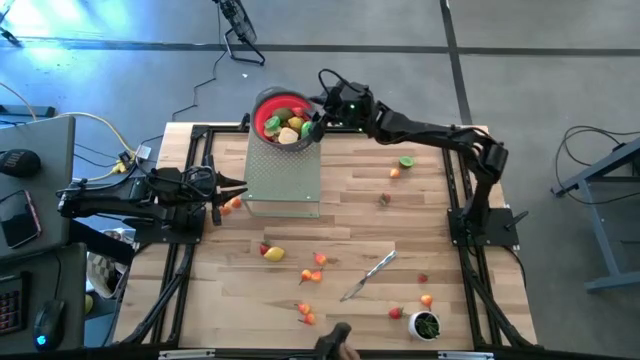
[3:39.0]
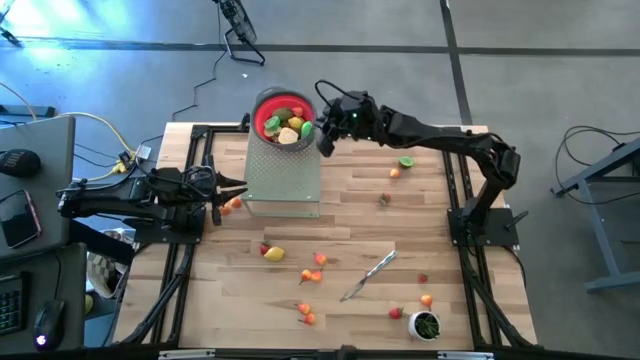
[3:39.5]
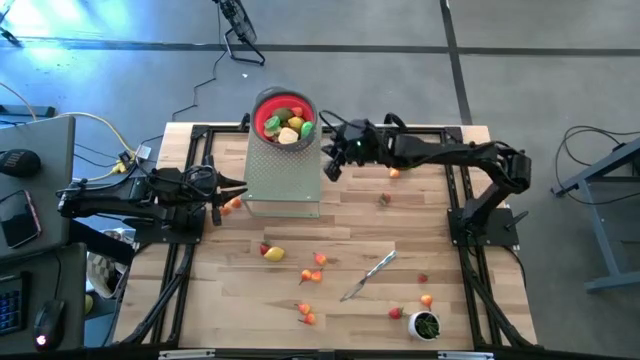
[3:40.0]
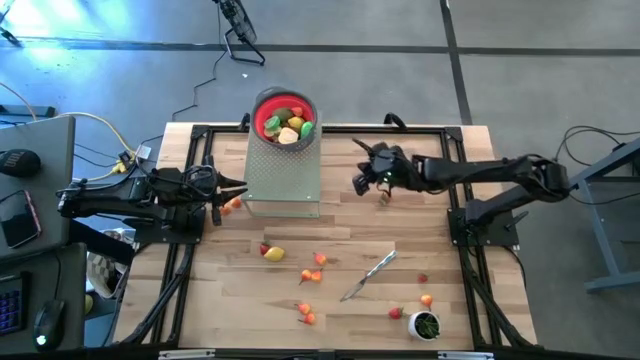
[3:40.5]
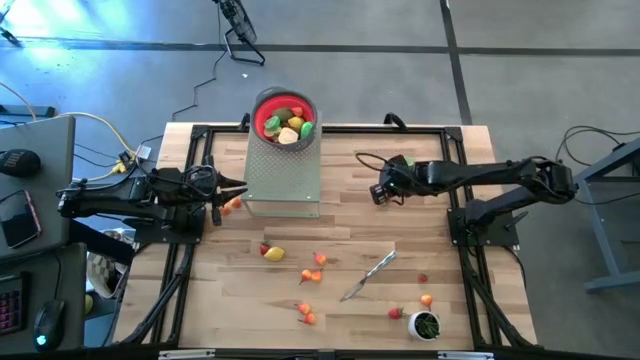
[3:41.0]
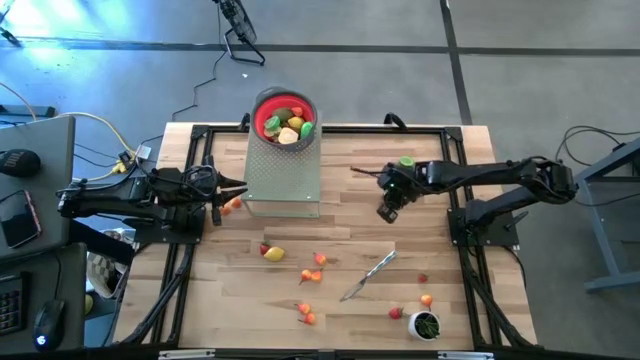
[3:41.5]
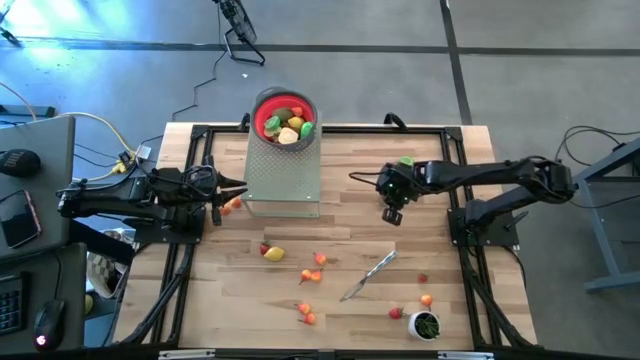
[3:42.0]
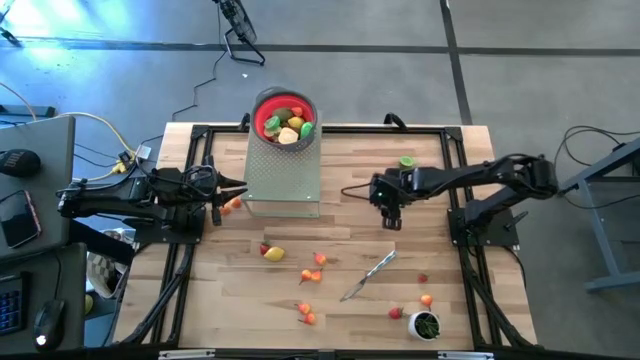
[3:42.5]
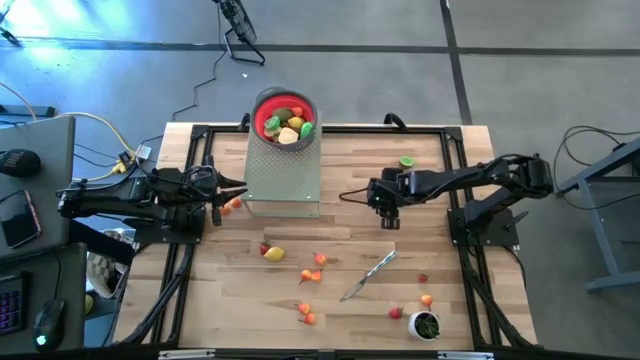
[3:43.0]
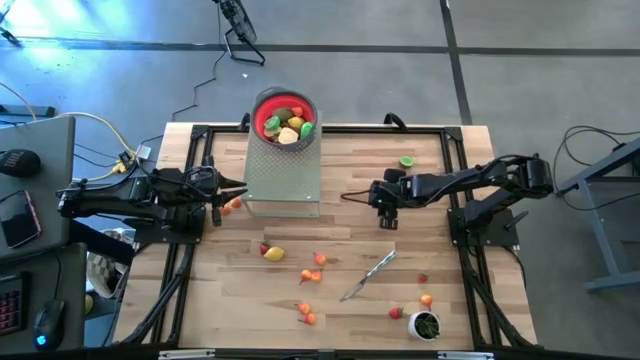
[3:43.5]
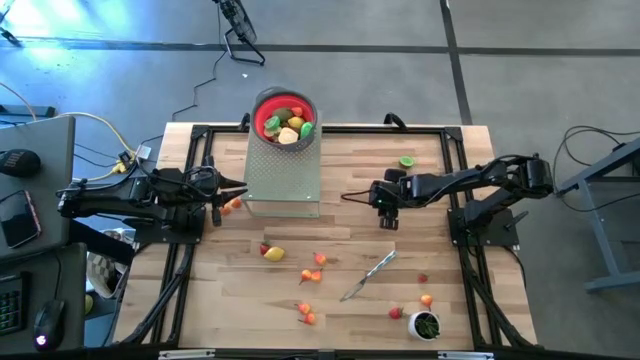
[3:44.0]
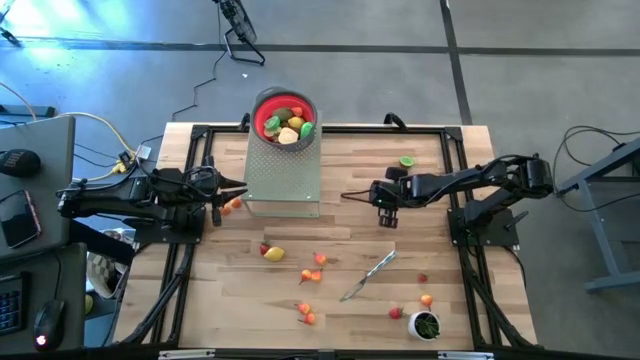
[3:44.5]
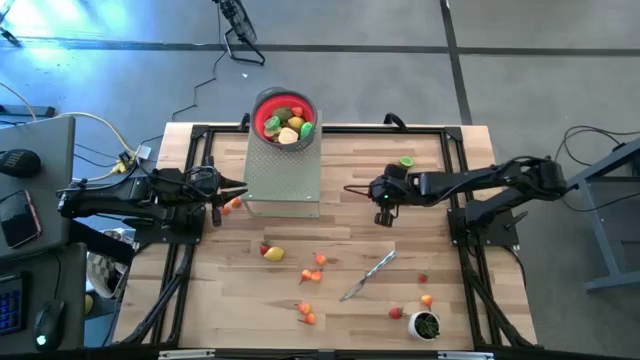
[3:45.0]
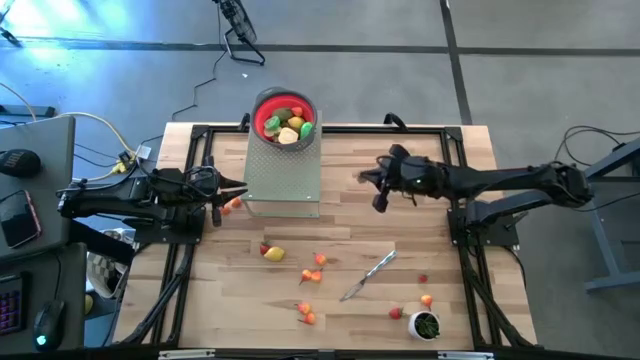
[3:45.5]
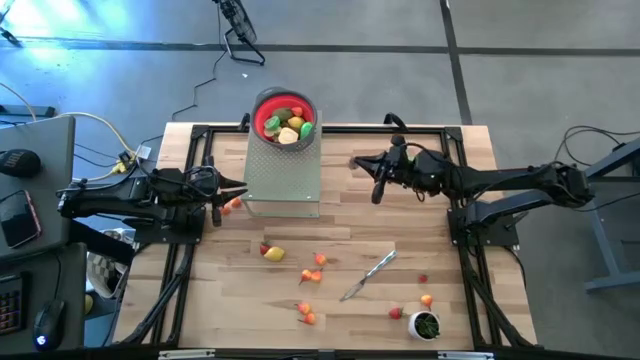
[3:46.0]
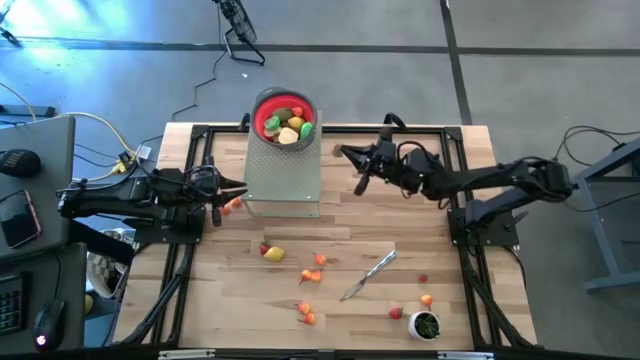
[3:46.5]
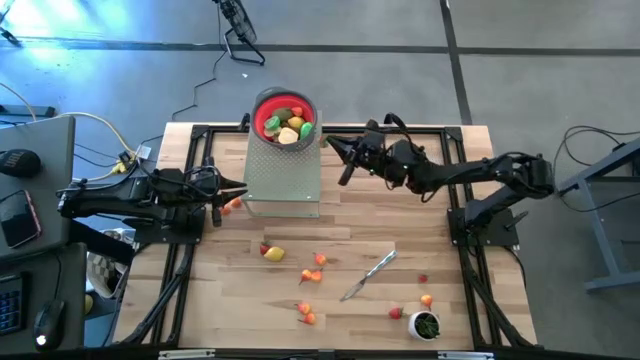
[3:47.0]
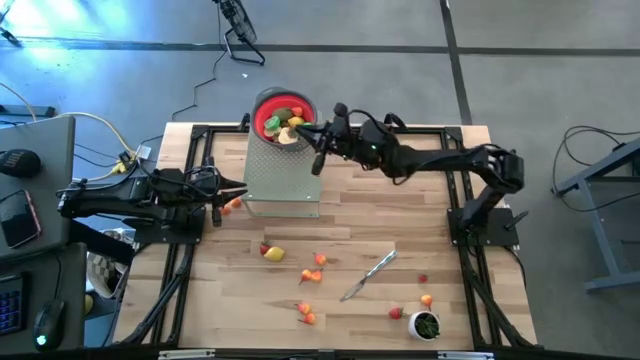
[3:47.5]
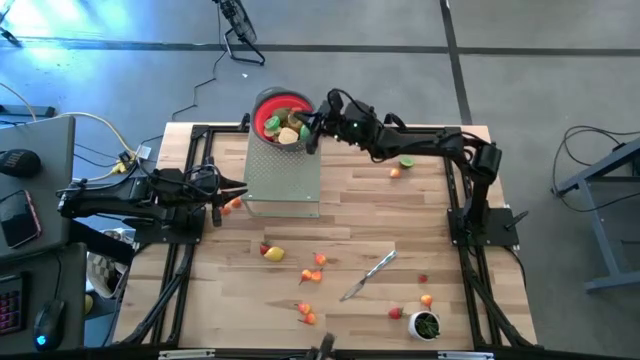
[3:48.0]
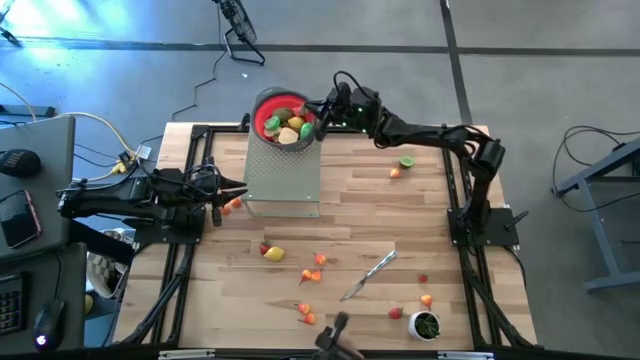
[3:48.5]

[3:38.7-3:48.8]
Task: Pick & Place Fruit
Put the strawberry into the red strainer on the shelf

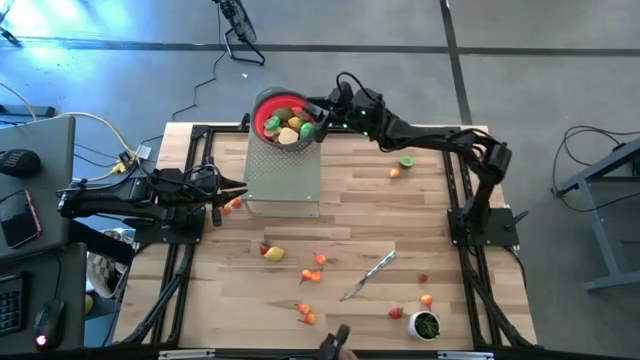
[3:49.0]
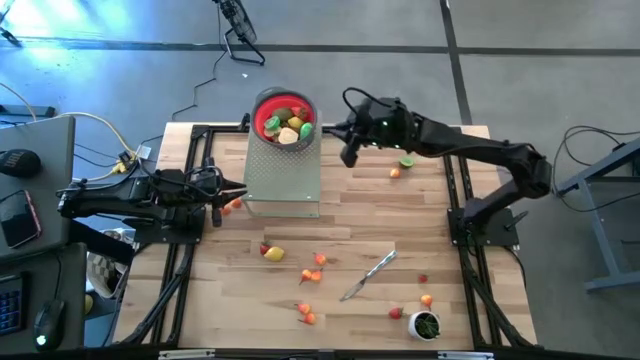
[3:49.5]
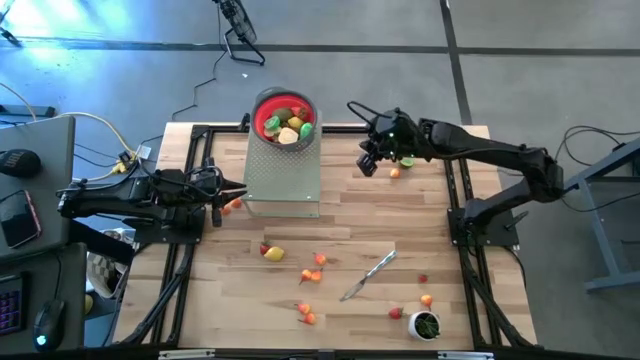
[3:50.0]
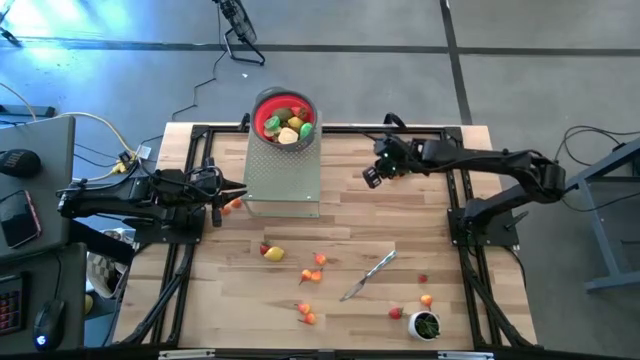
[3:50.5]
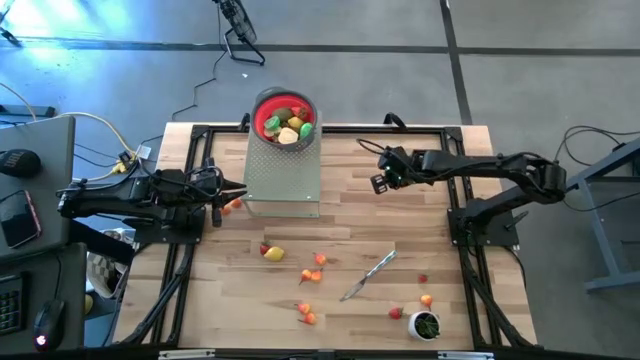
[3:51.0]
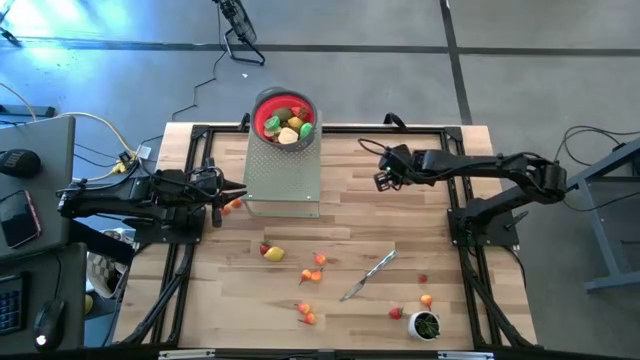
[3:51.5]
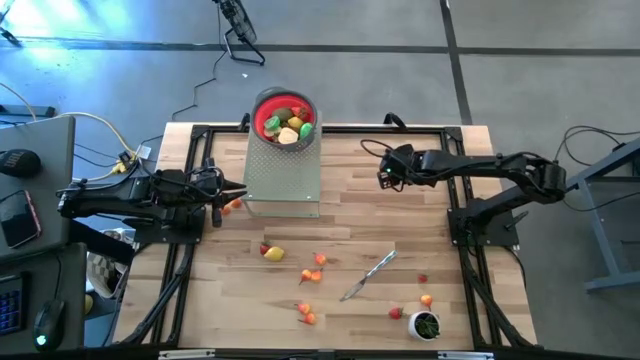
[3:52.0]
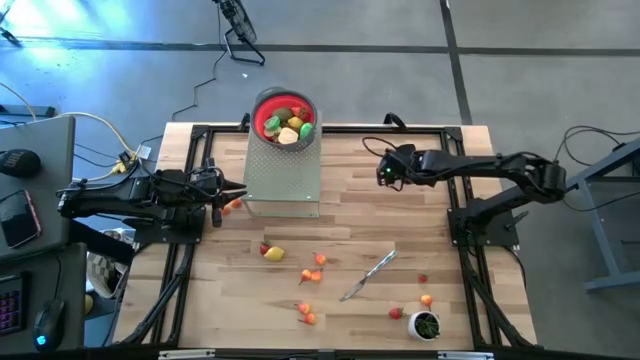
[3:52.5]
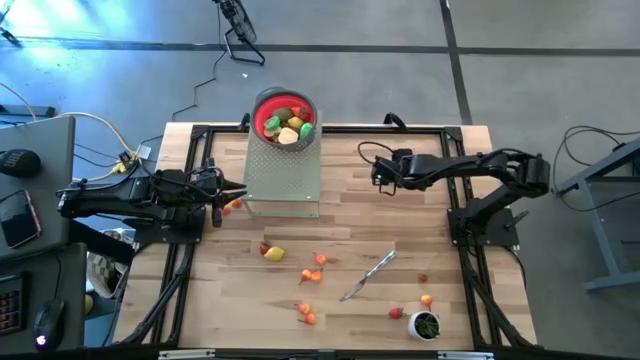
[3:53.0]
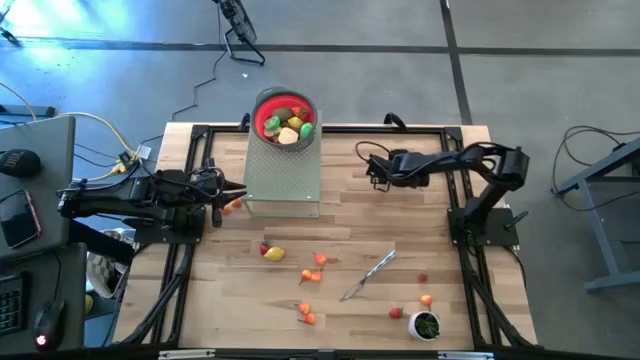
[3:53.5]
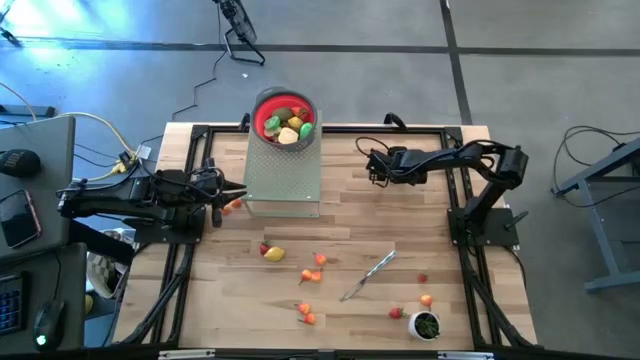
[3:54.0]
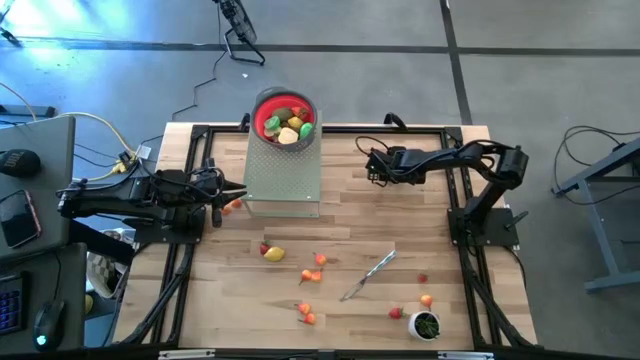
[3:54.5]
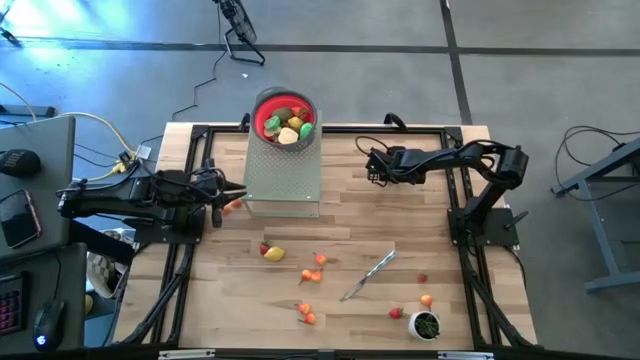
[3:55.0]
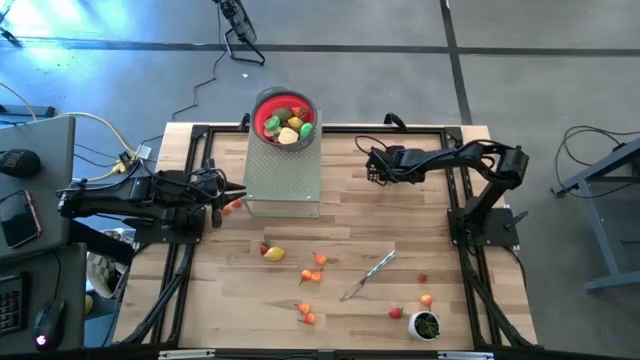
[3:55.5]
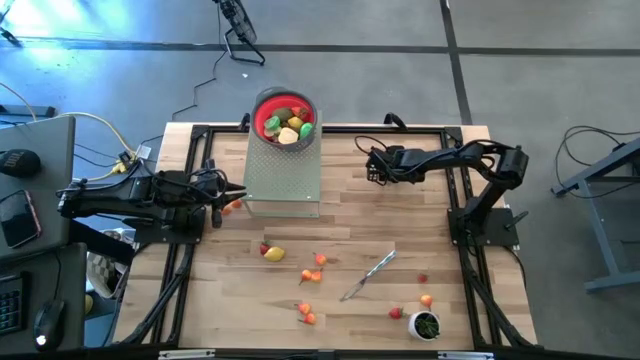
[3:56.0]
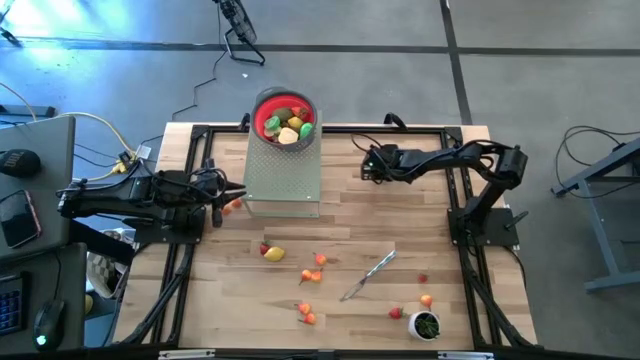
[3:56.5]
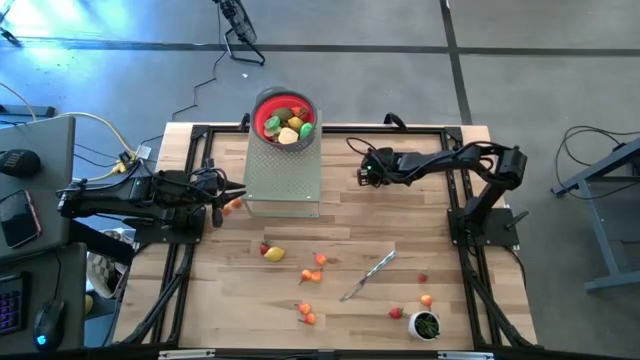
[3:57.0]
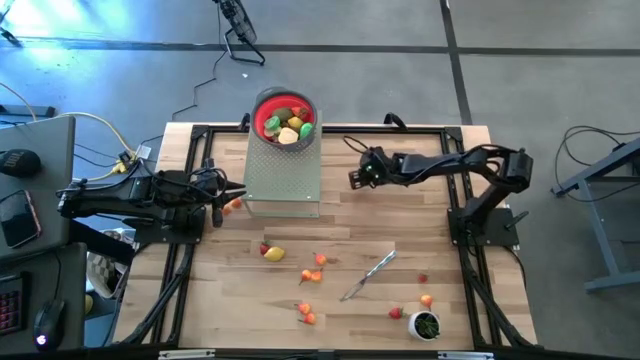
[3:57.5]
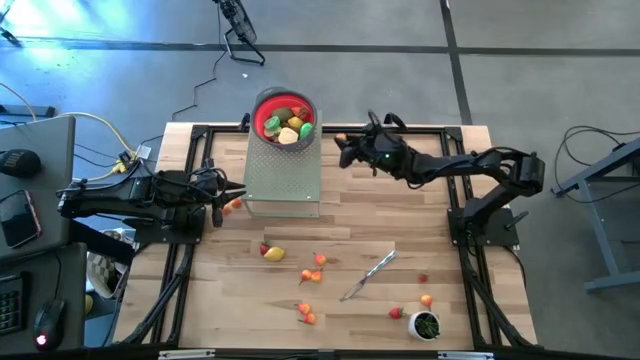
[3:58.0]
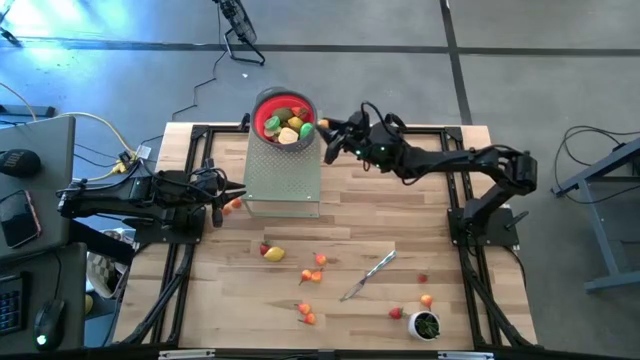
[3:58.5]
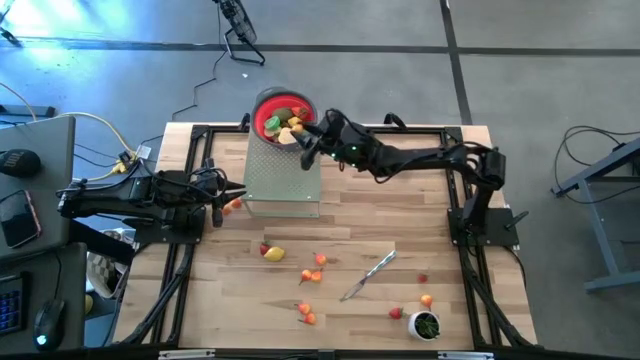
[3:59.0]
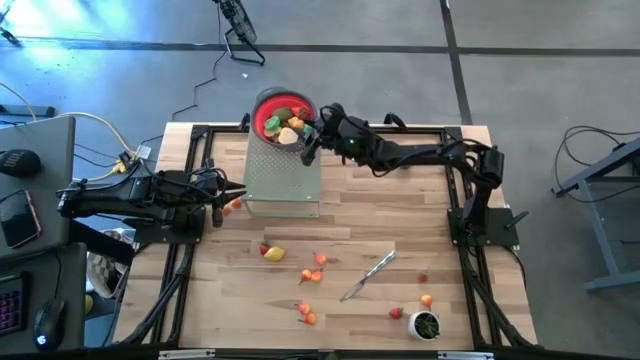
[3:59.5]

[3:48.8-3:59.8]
Put the orange pear into the red strainer on the shelf
